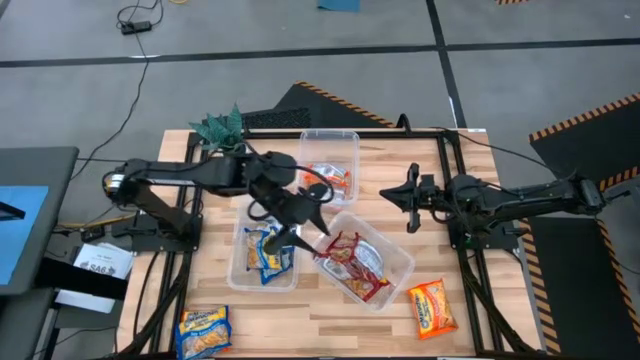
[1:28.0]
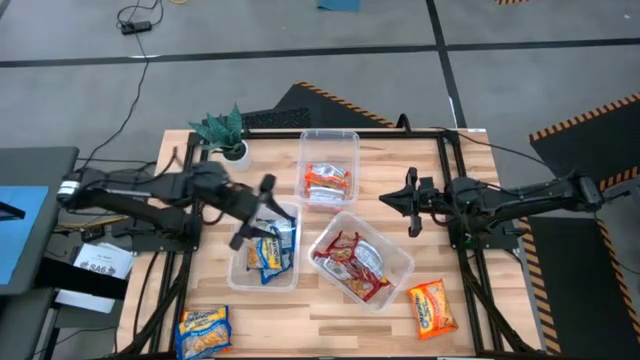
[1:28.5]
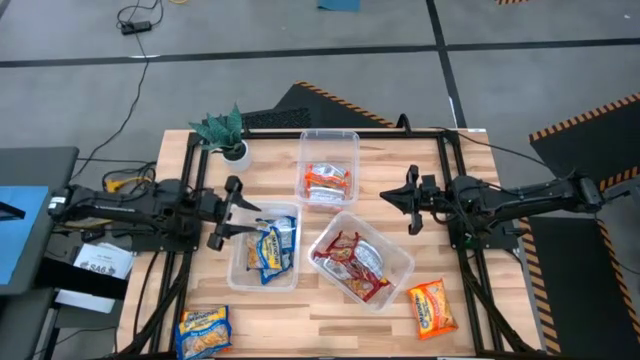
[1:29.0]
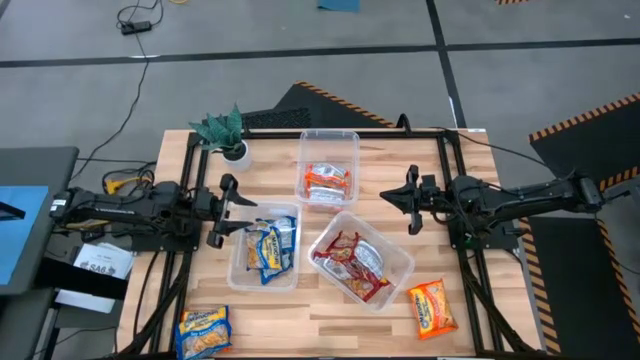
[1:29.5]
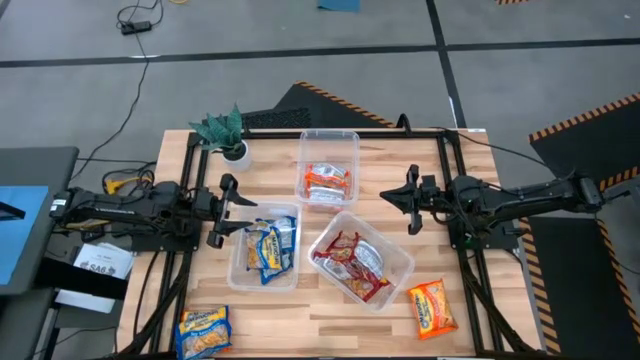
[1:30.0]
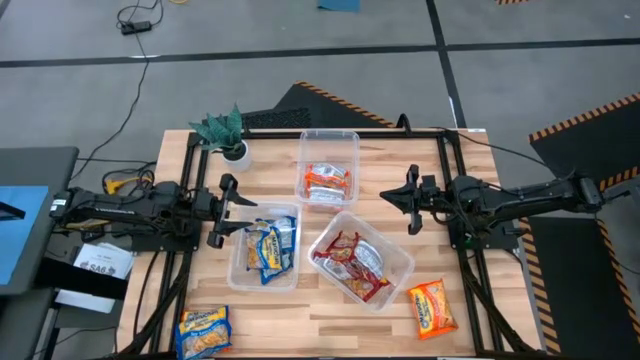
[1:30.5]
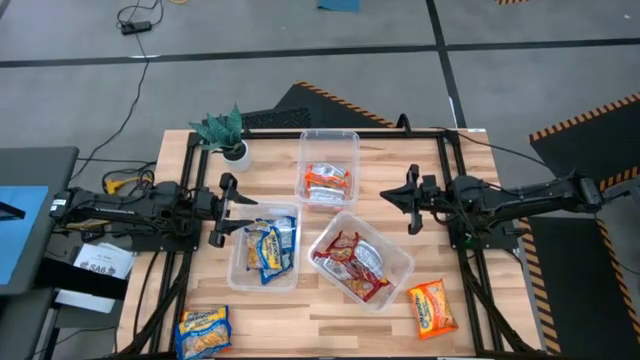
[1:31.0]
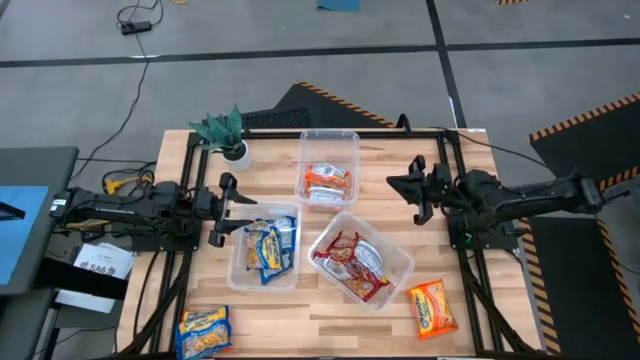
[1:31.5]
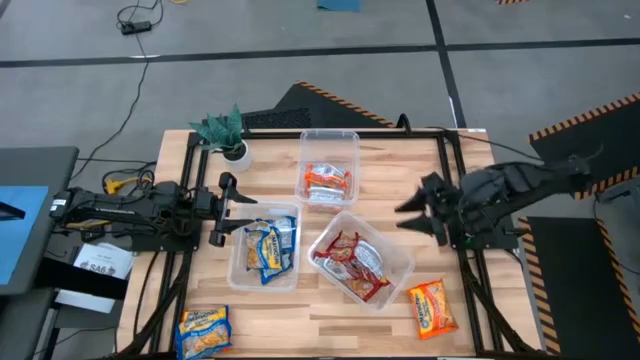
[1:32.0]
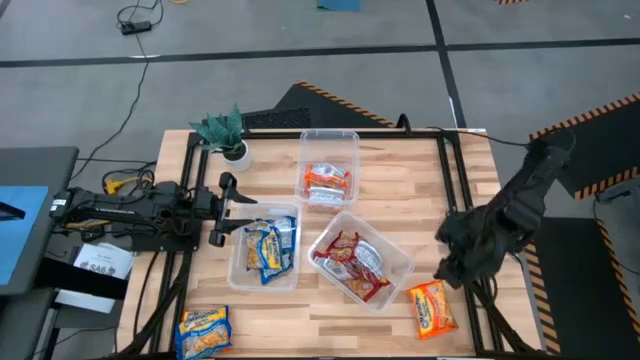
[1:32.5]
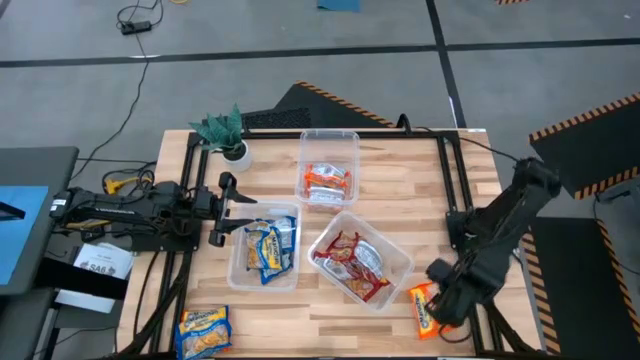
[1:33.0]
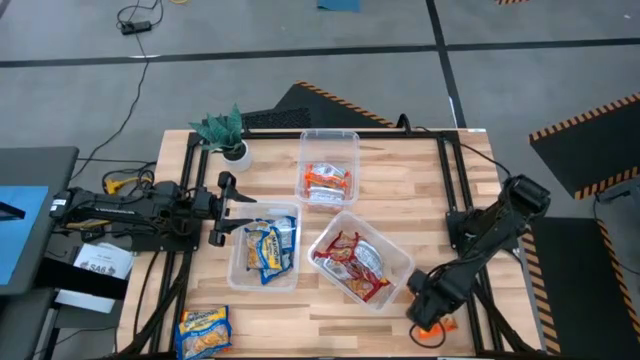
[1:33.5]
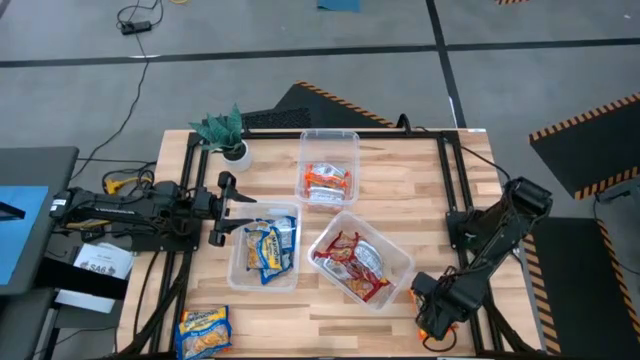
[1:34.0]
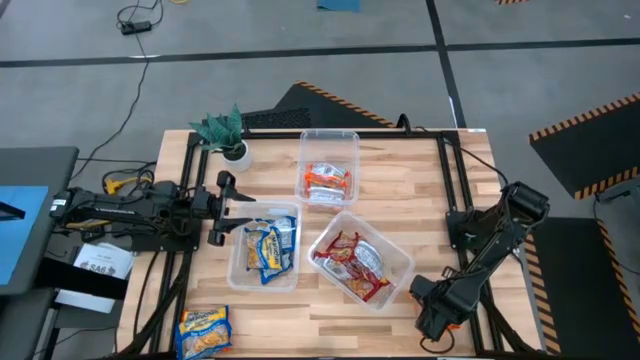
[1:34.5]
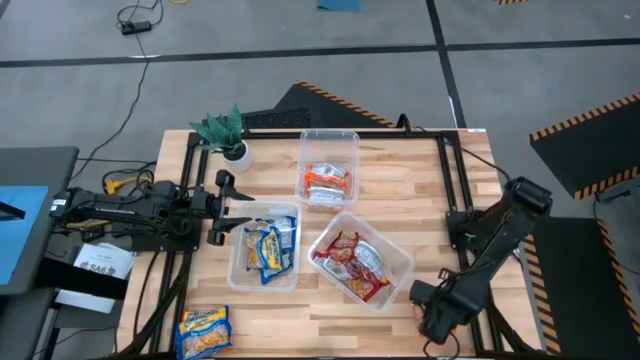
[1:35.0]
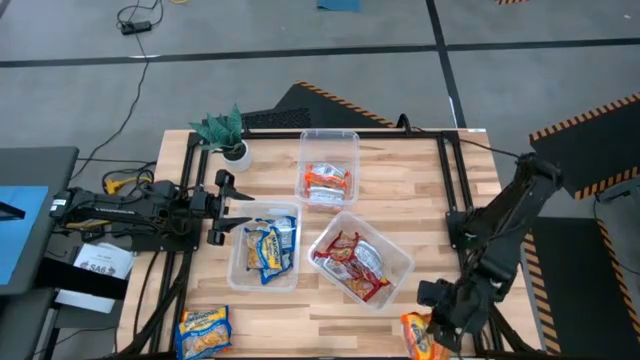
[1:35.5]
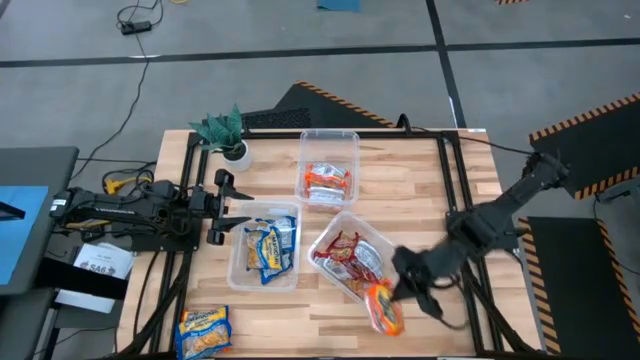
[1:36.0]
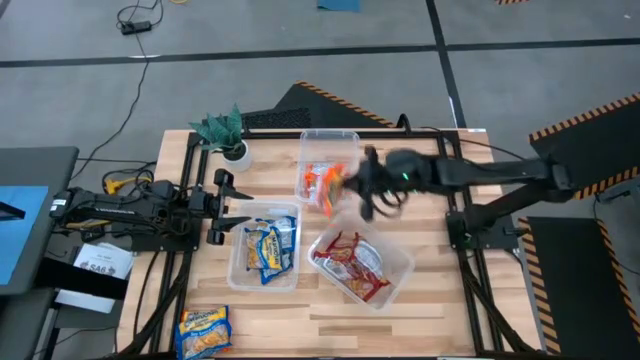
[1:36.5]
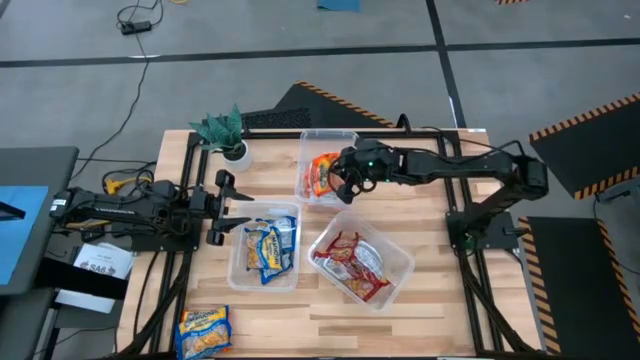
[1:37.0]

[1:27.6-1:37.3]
Task: Sort Maruchan noodles
Put the orange noodle pack into the top transparent bin

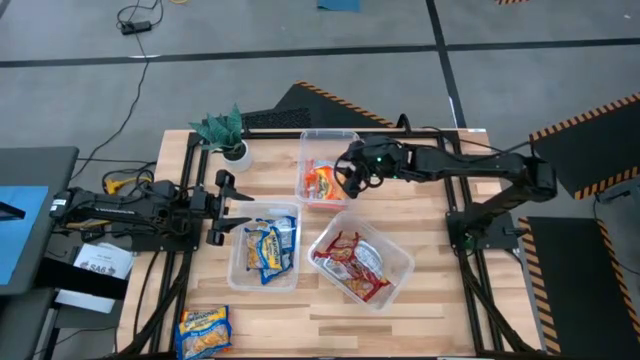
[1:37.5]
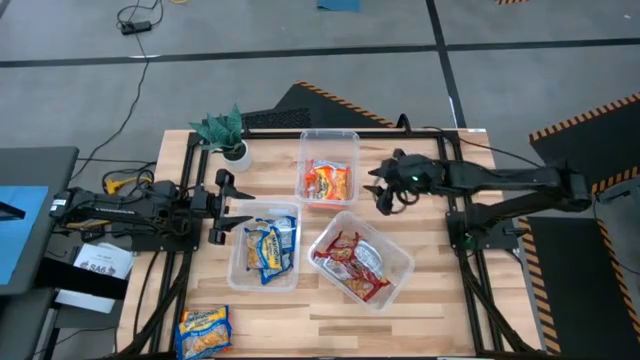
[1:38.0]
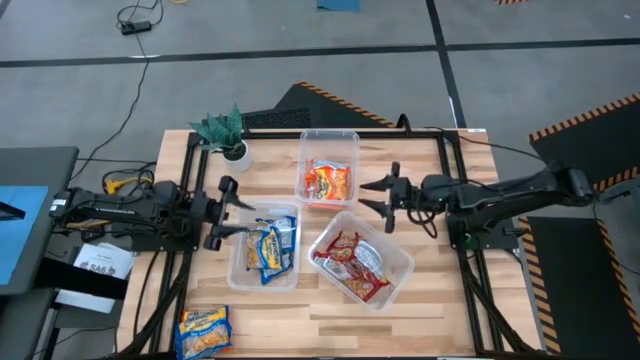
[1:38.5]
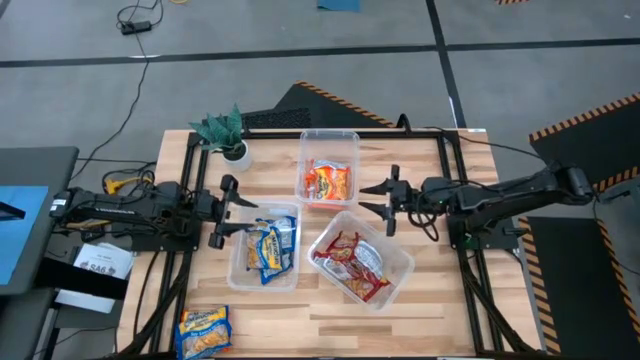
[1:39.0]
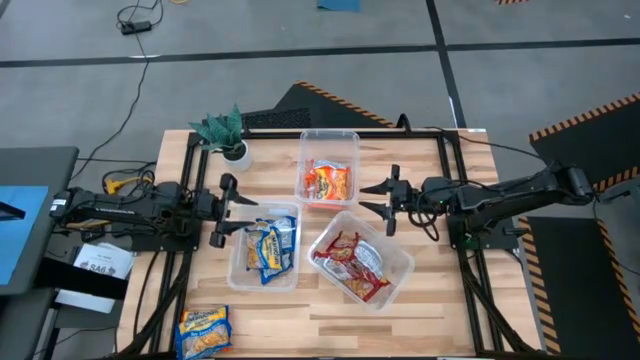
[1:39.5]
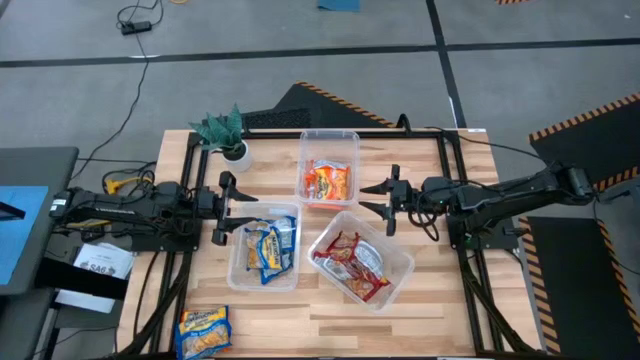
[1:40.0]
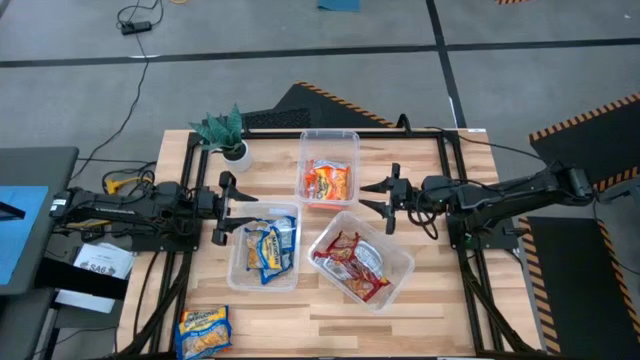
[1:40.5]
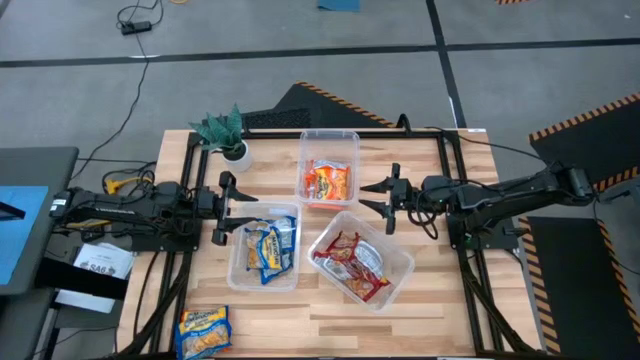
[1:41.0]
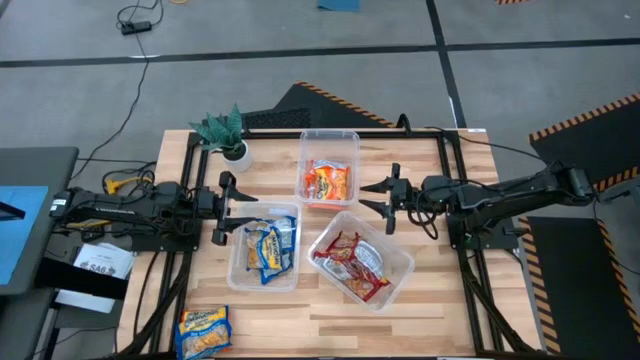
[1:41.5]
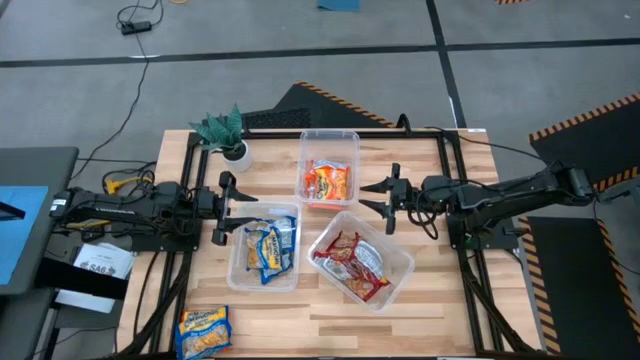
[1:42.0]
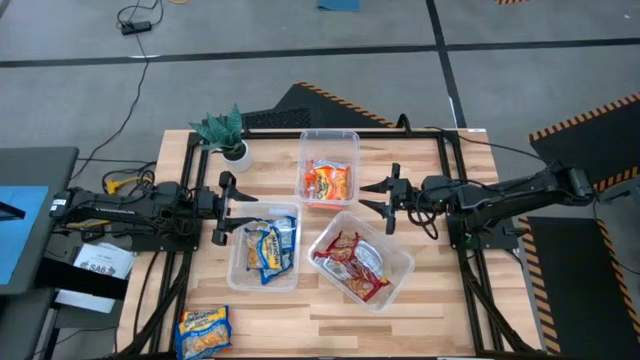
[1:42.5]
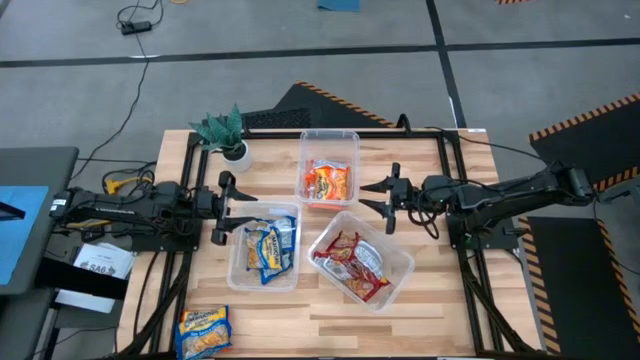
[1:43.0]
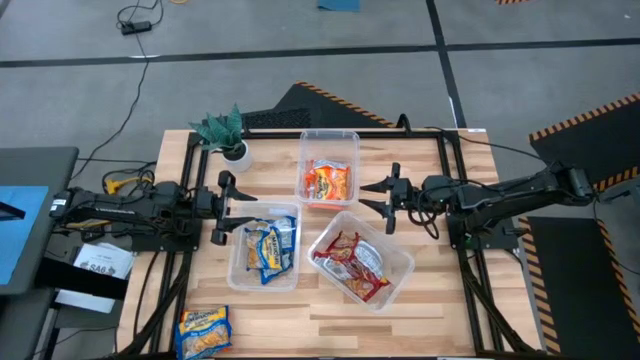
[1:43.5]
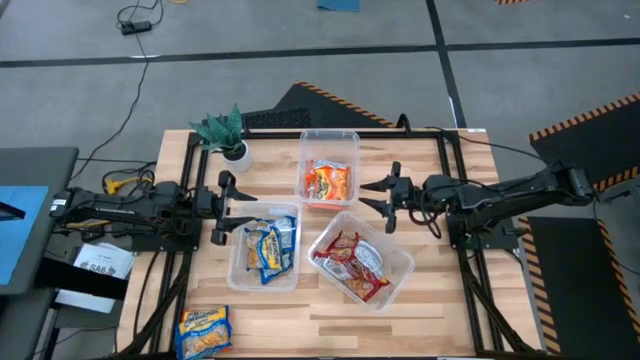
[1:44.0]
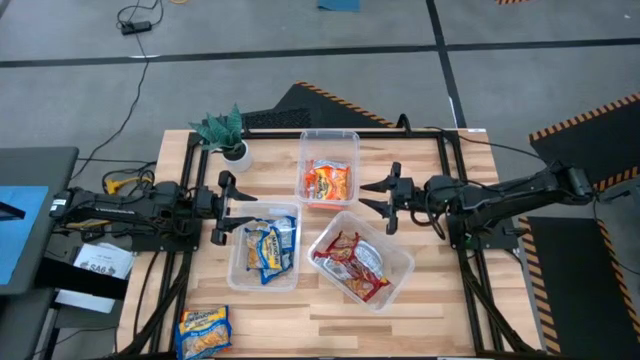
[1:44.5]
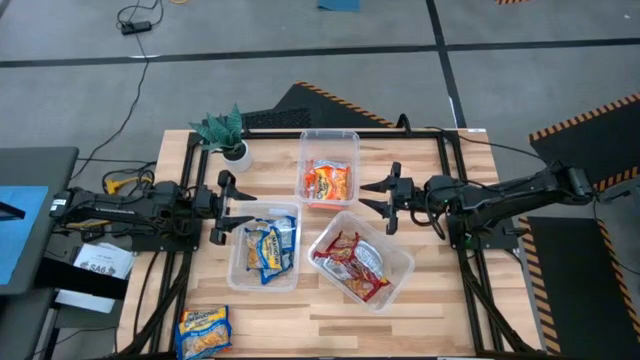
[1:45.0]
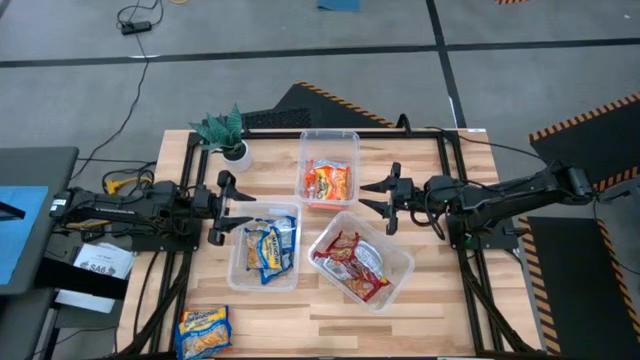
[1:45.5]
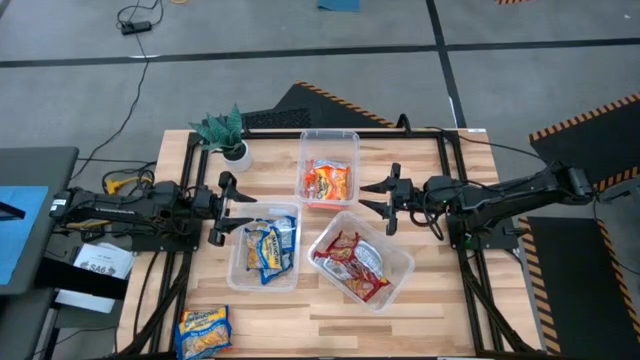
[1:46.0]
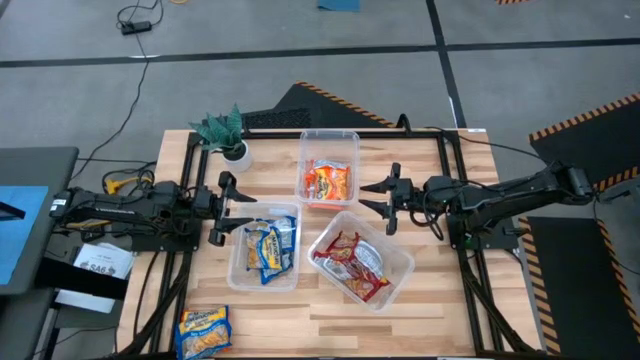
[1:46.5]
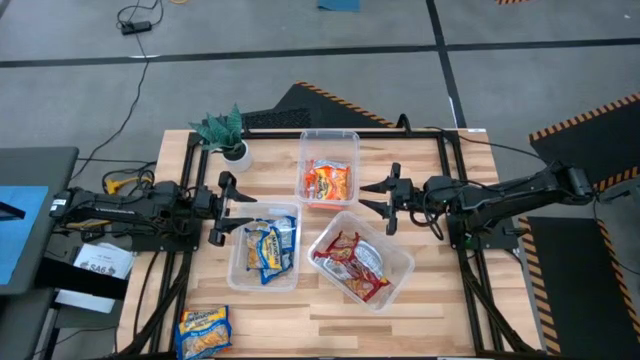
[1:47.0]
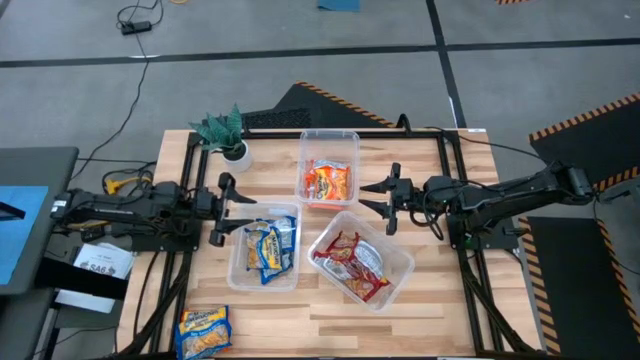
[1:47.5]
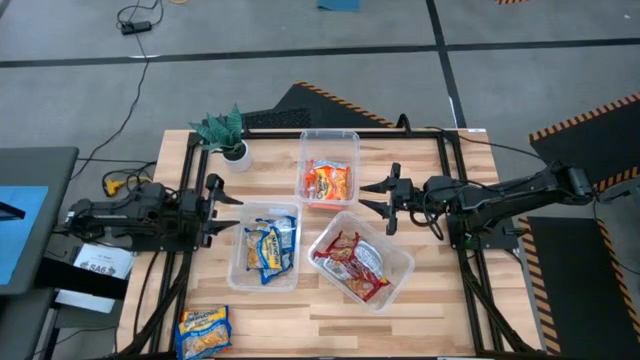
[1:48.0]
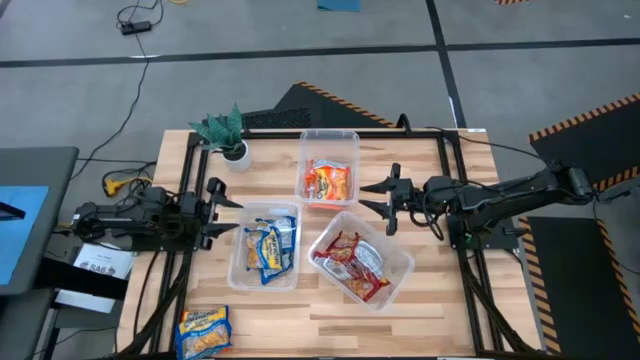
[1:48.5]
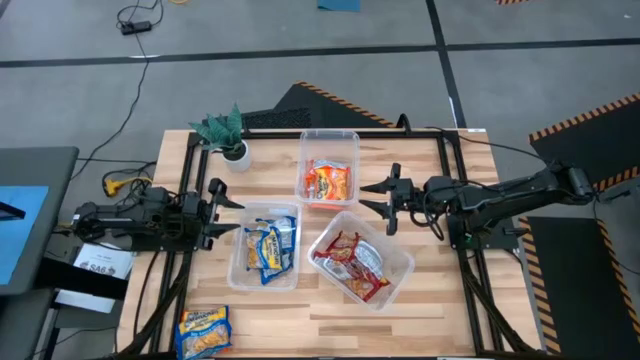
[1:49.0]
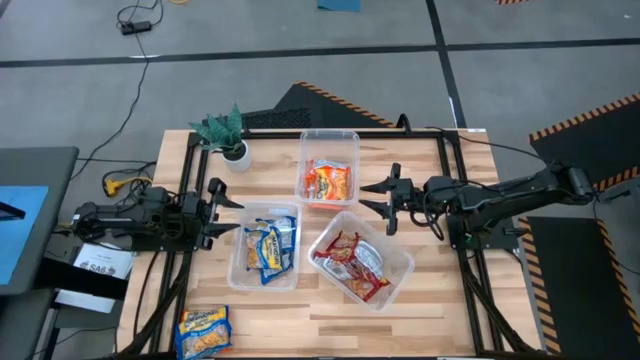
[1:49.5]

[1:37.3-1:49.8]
Put the blue noodle pack into the bottom left transparent bin
